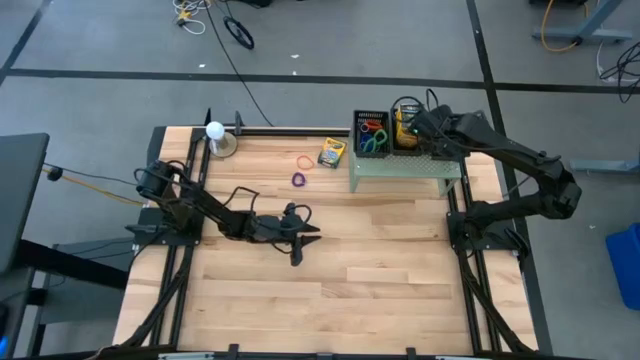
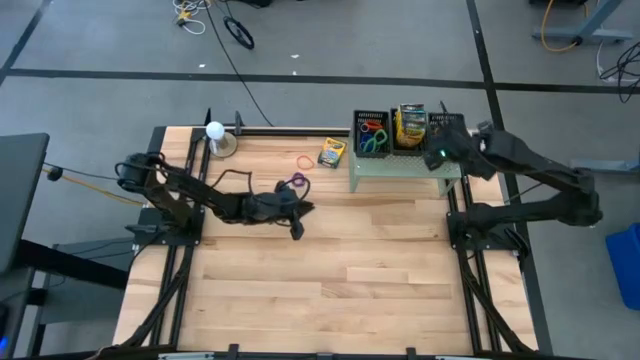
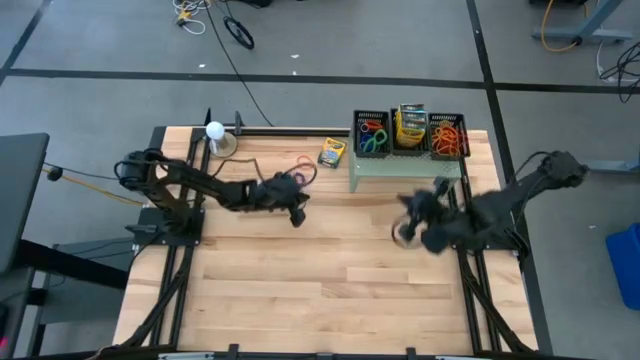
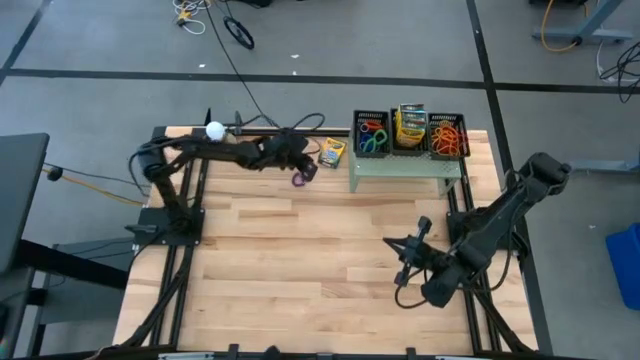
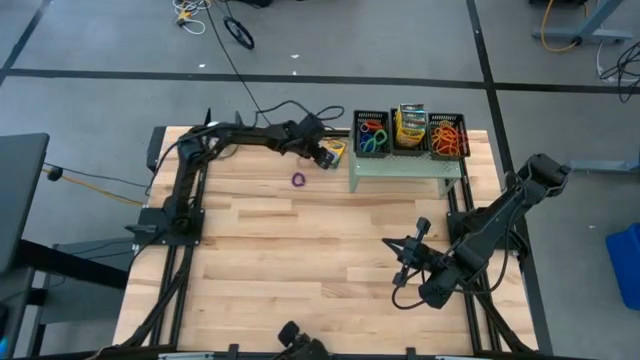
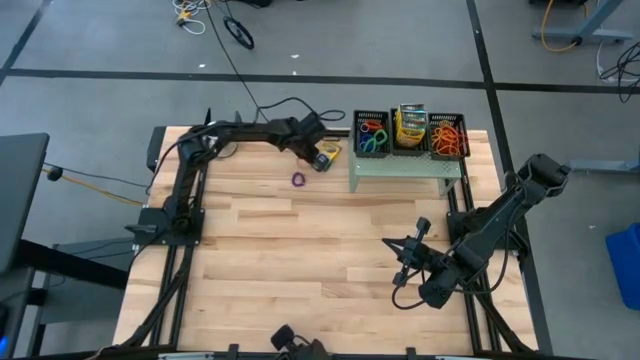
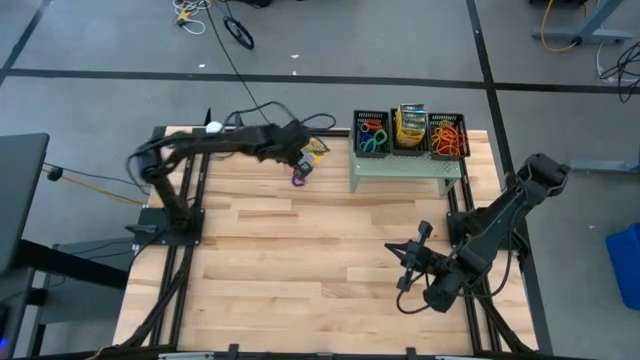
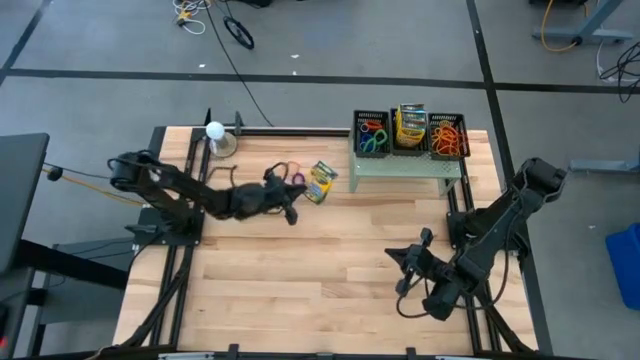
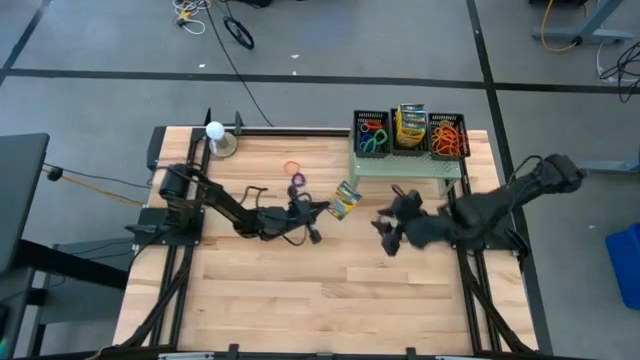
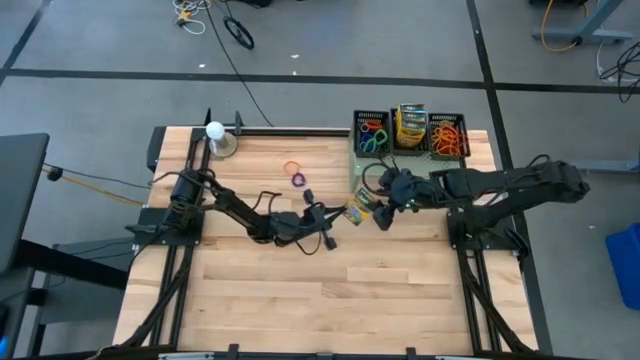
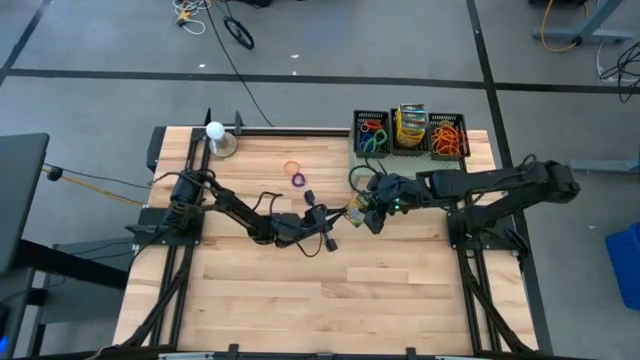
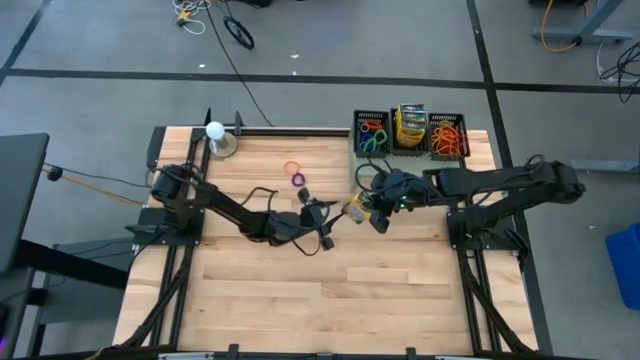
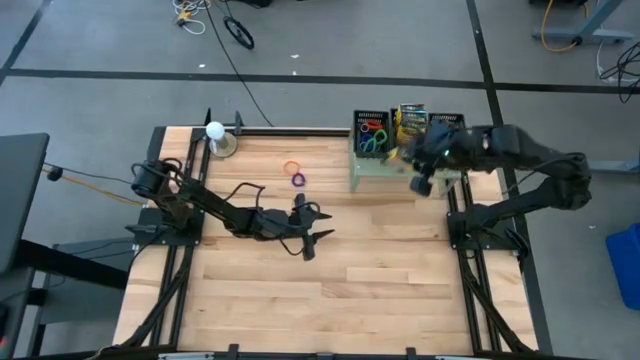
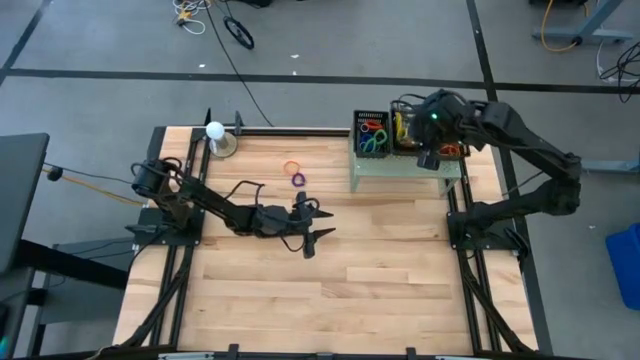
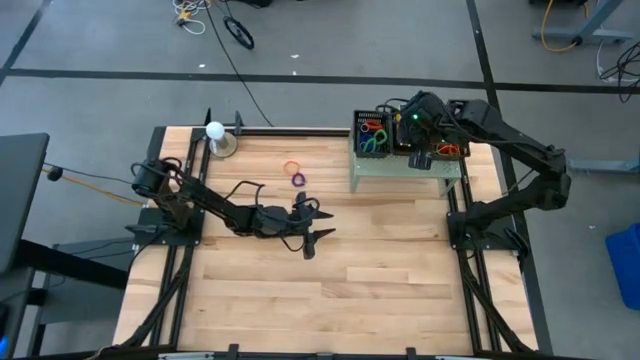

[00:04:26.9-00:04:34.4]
Task: Pick & Place Office Desk Supplies
Put the yellow crayon box into the middle black basket on the shelf

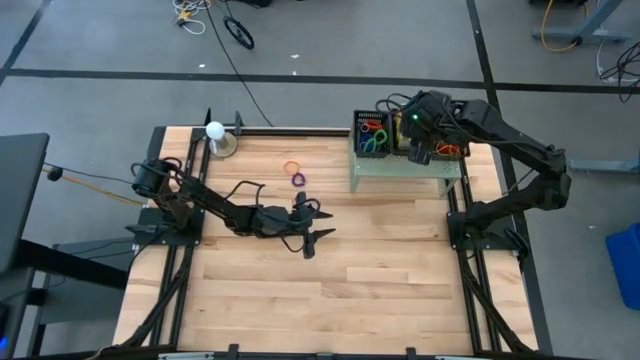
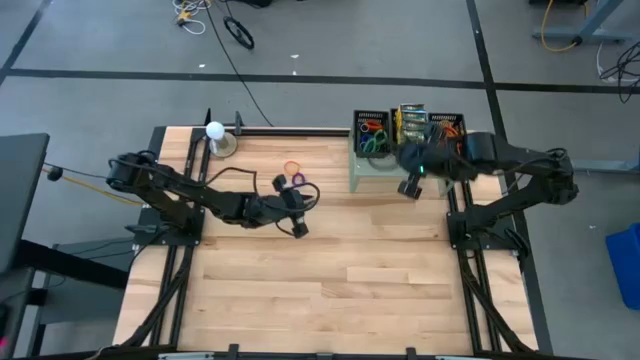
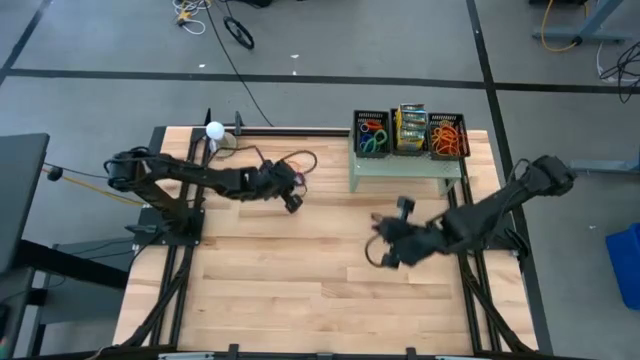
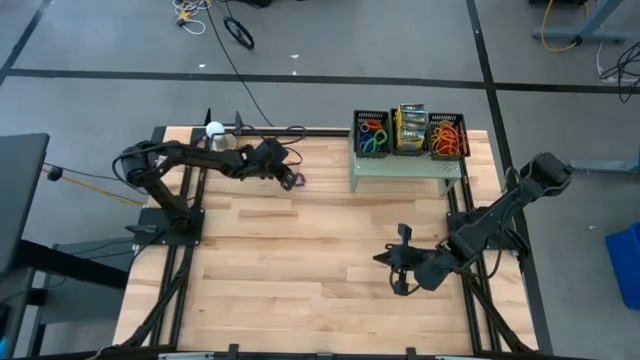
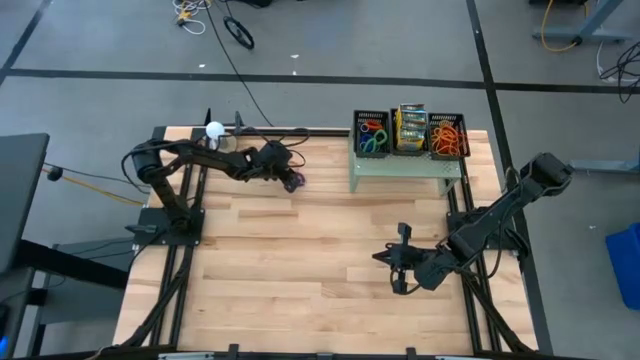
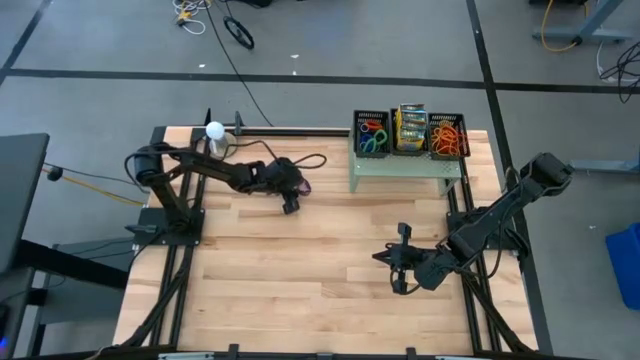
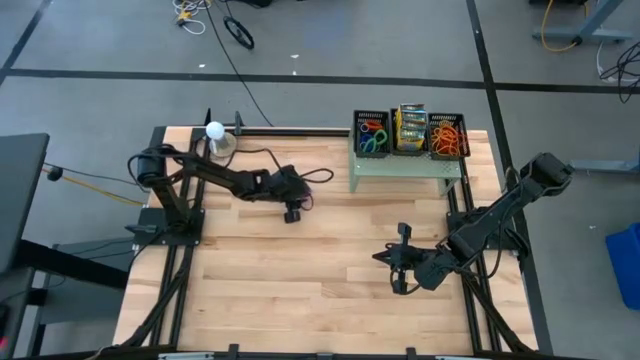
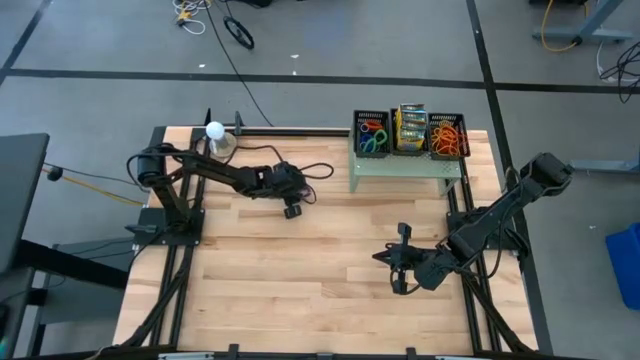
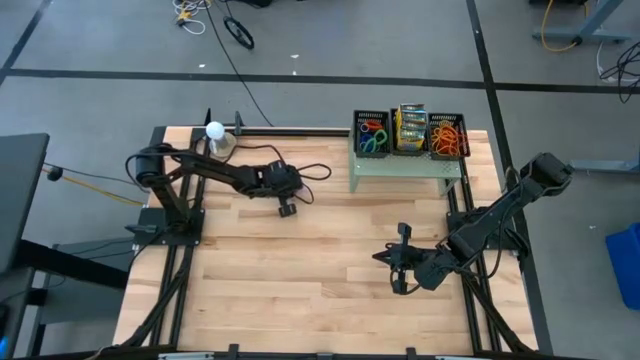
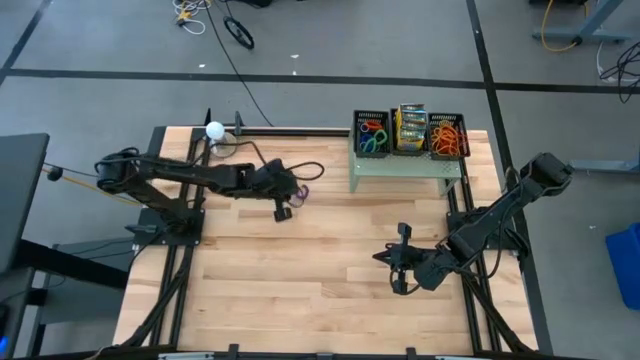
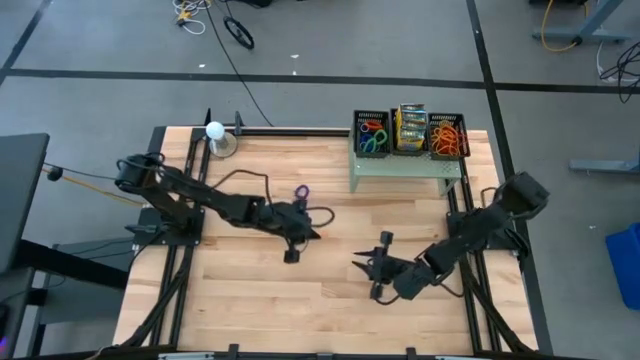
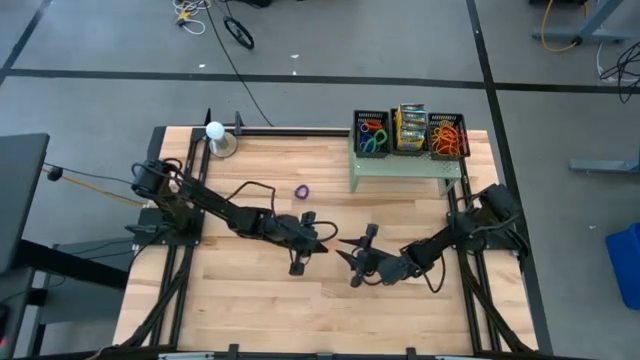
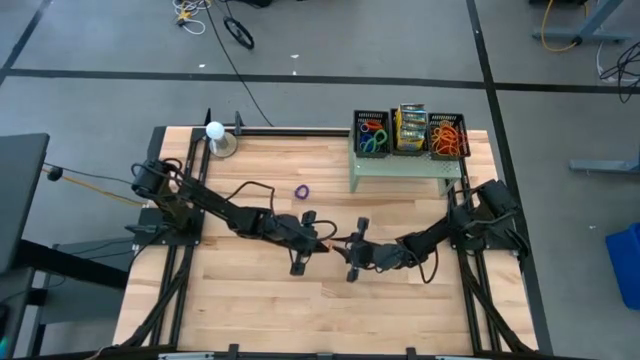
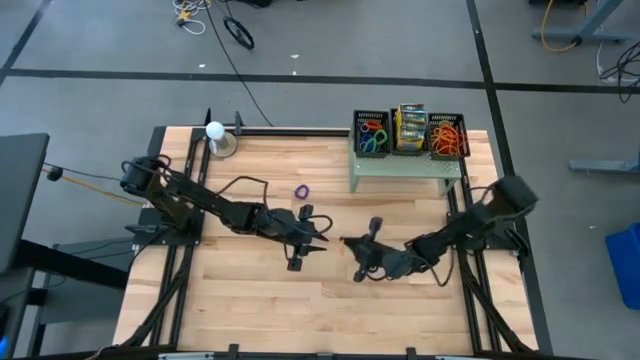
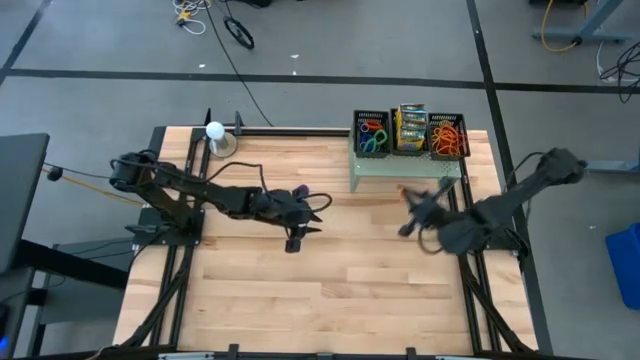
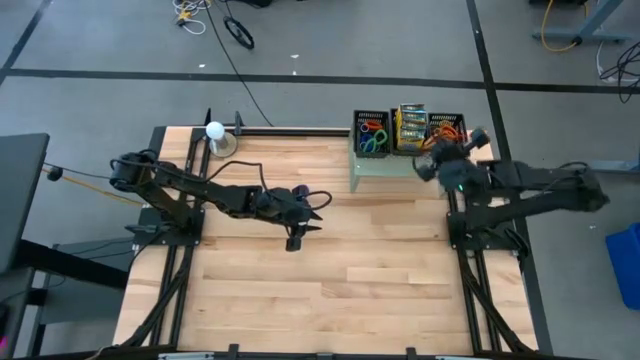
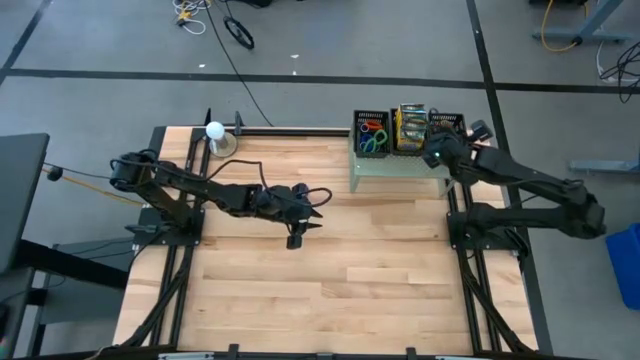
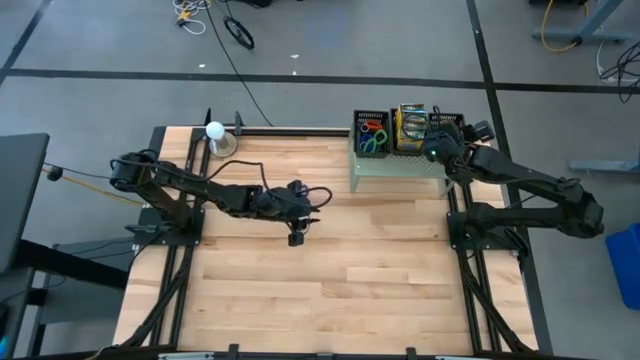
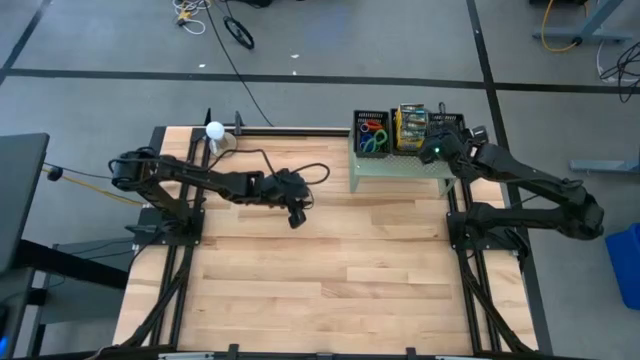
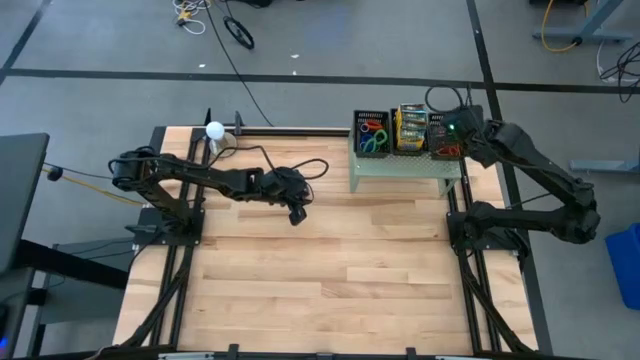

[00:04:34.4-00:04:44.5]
Put the orange rubber band into the right black basket on the shelf

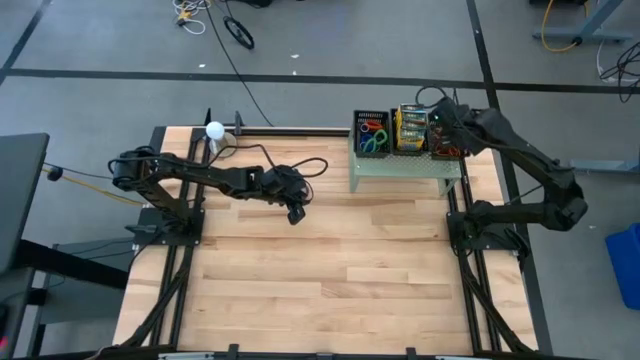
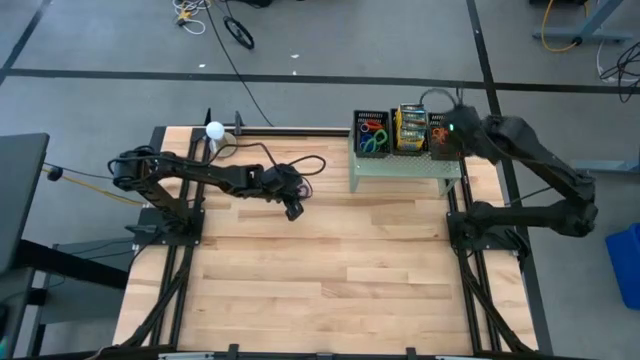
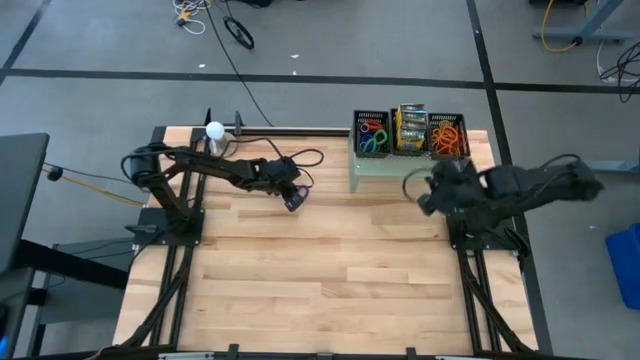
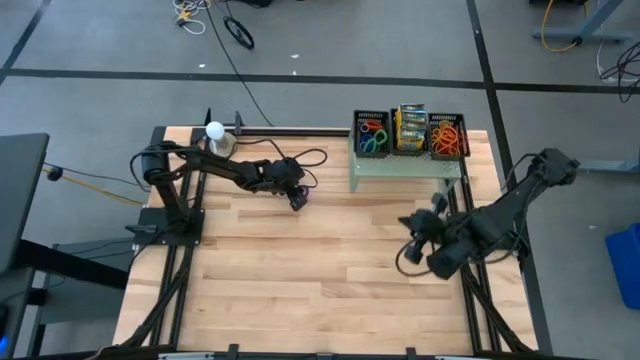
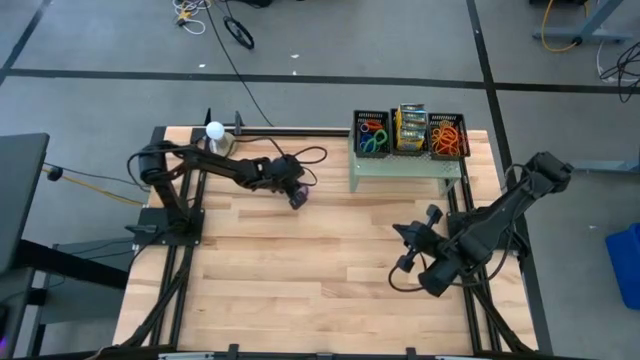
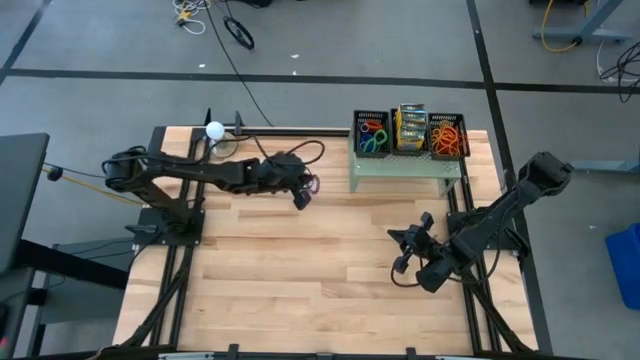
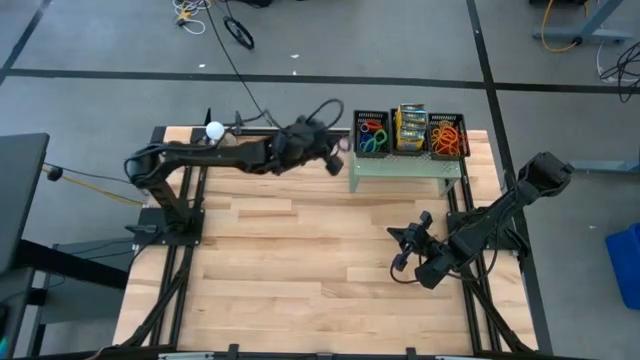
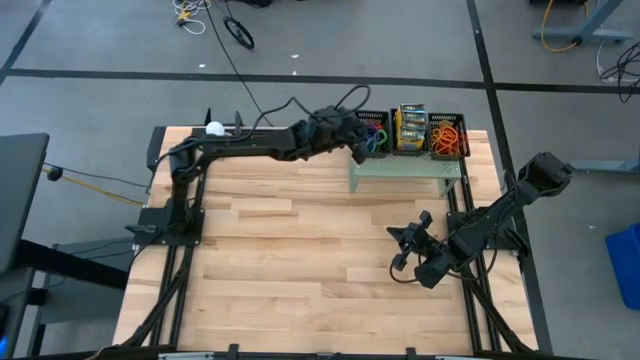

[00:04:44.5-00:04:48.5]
Put the purple spring keychain into the left black basket on the shelf
